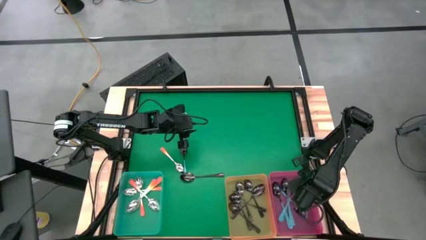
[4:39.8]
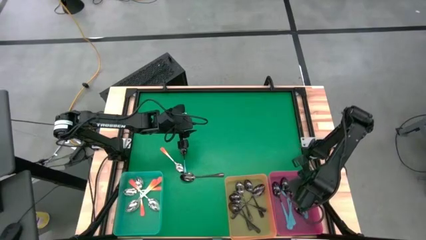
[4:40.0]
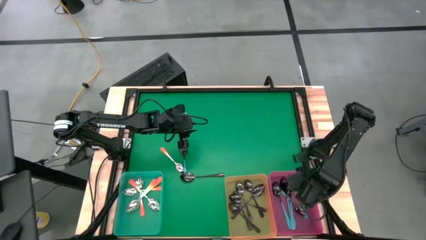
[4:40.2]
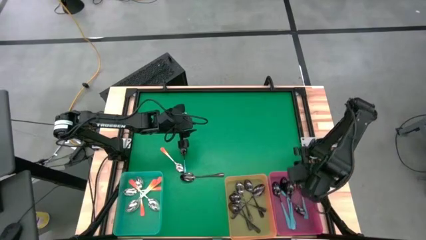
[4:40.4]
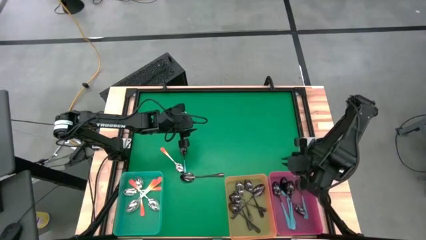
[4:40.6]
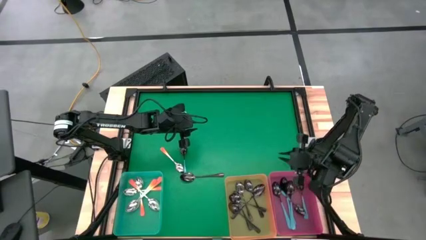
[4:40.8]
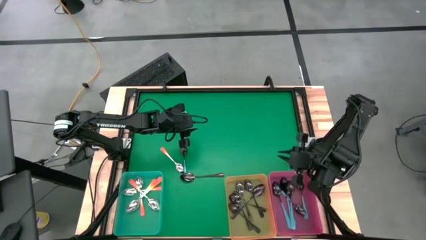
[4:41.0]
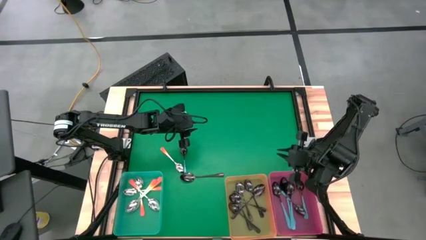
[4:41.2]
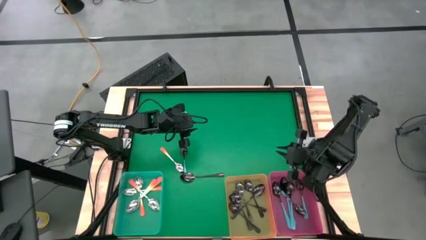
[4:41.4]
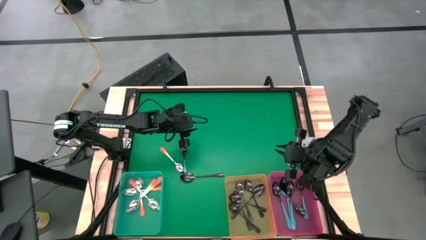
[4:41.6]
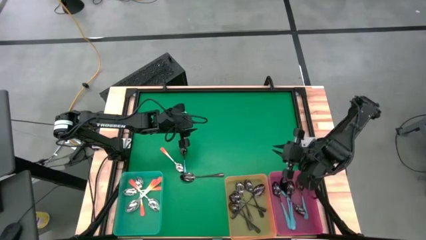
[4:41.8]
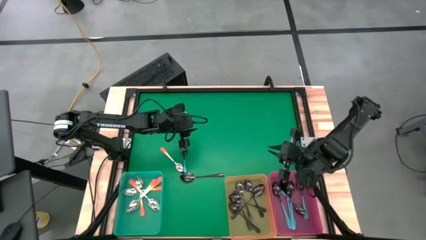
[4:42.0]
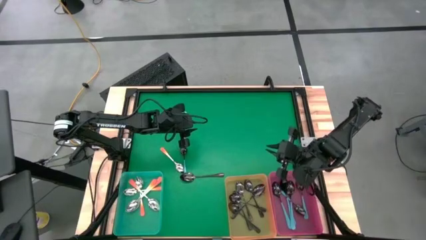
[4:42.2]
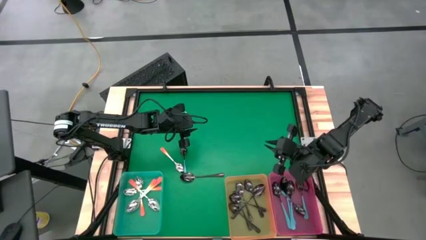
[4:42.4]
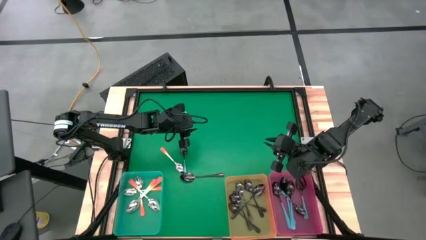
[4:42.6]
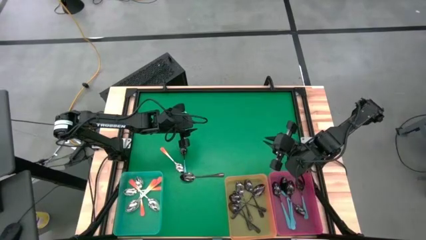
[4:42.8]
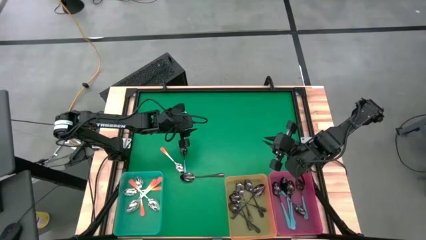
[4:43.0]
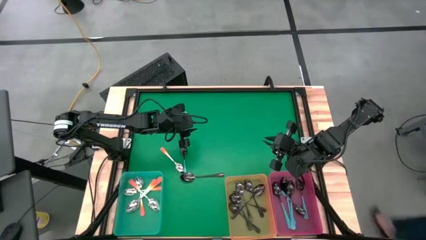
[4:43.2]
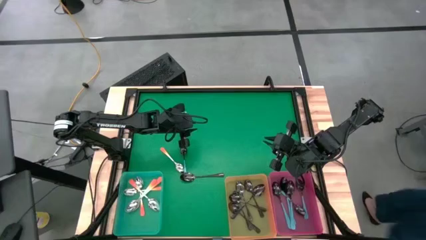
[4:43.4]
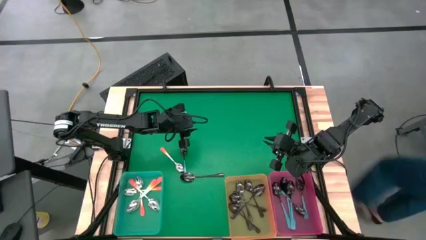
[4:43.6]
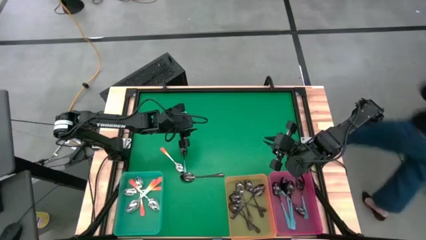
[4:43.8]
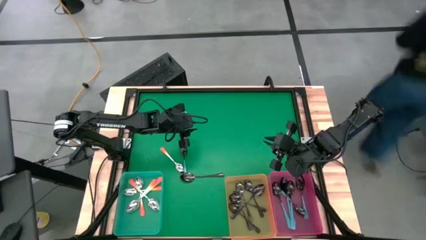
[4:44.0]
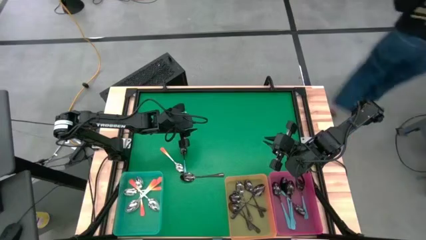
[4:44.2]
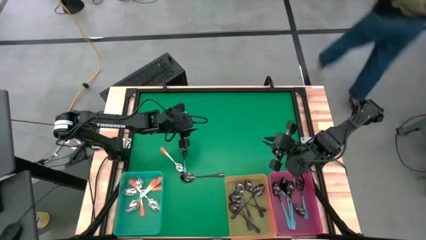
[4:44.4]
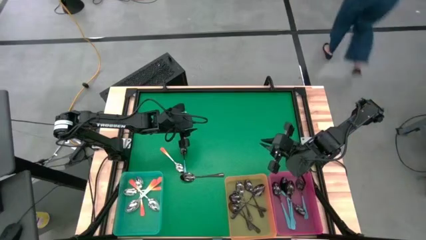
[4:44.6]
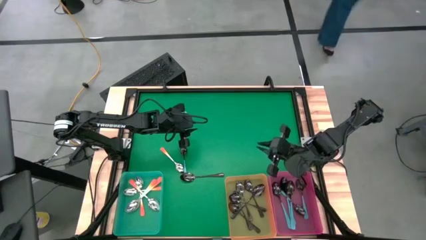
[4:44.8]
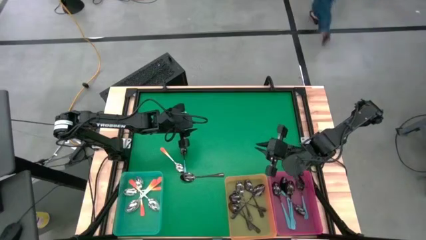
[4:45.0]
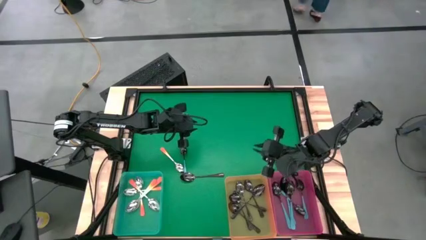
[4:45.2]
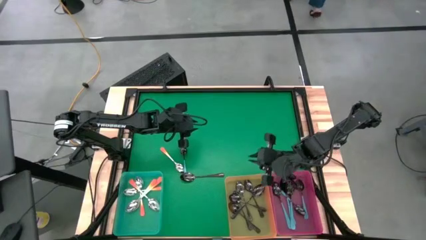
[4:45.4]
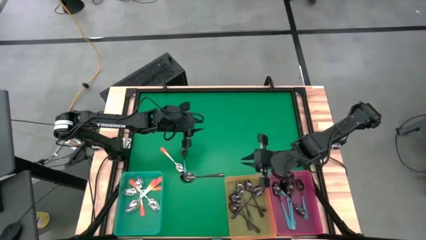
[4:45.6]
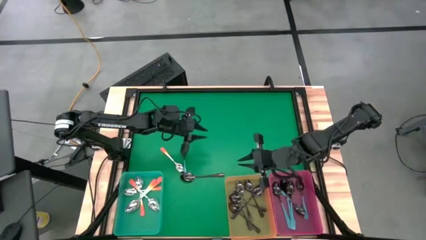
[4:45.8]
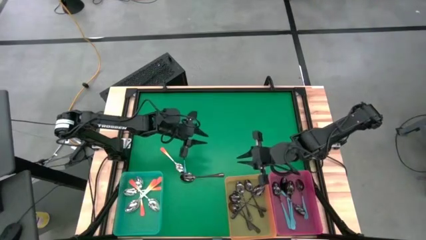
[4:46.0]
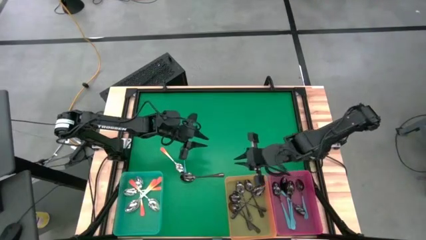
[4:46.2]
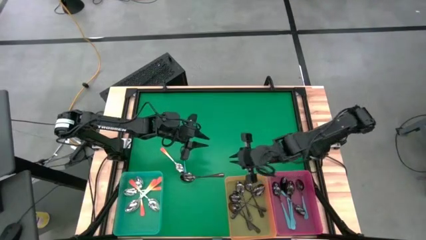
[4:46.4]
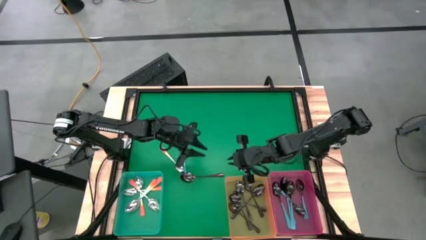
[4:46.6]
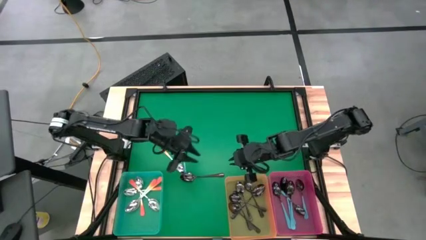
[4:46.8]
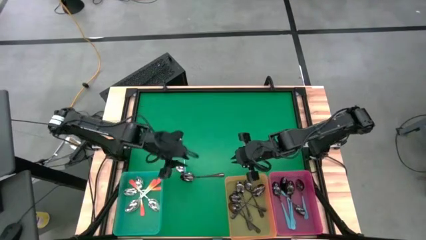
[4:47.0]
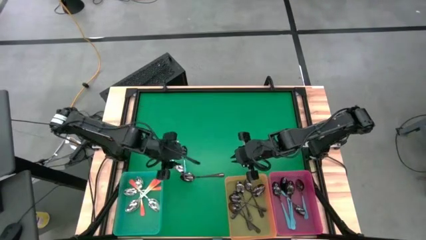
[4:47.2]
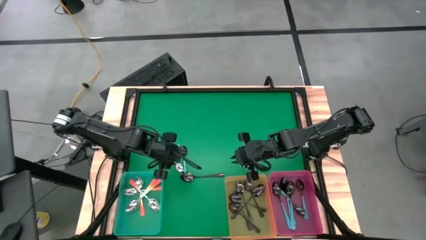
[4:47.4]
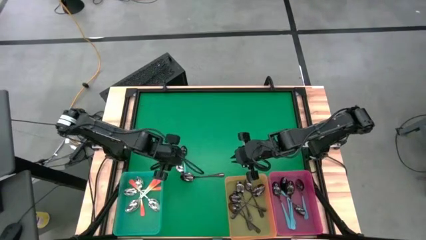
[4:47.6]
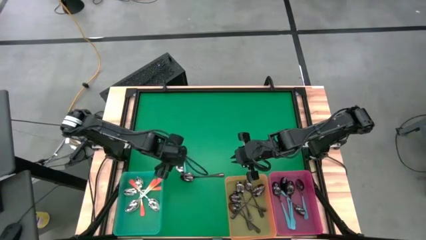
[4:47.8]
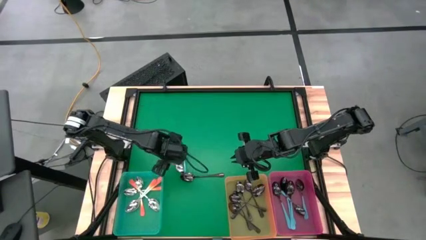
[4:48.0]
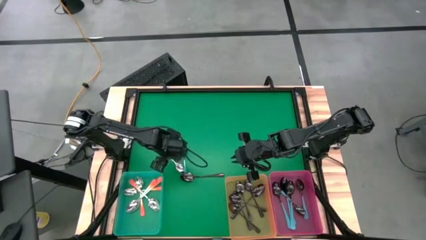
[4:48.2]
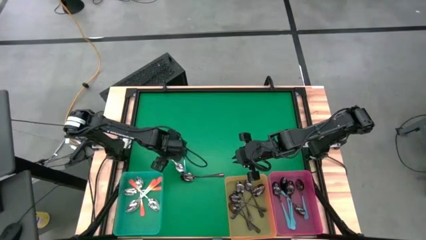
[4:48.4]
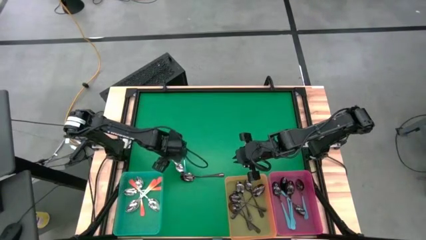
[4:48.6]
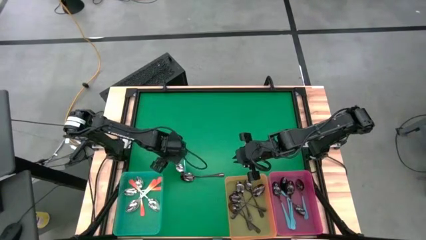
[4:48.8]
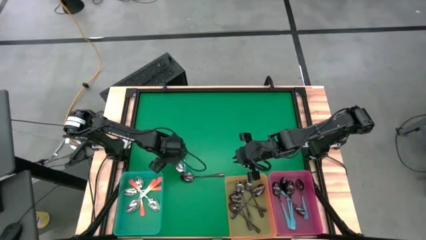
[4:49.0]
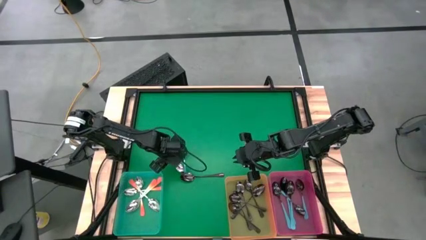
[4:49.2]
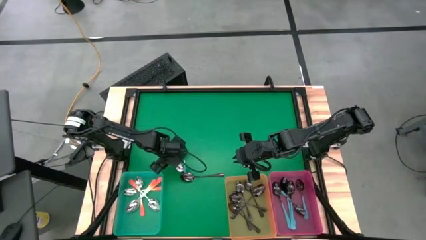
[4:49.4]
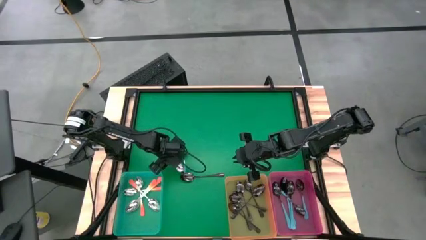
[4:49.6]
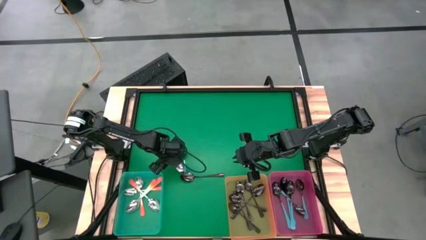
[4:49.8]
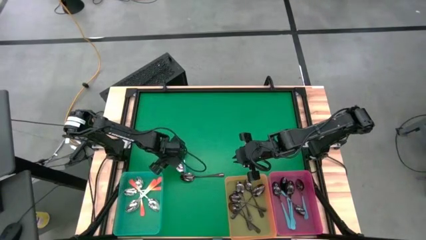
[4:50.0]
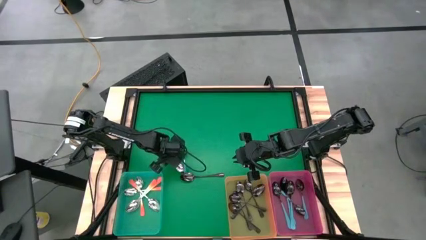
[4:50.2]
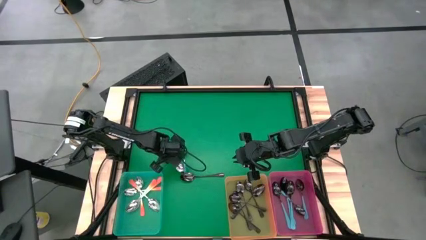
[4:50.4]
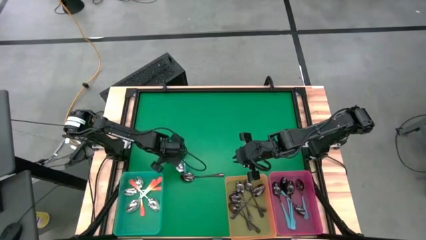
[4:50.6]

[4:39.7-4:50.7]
Task: Sort silverware by color (type)
Put the orange spoon into the green bin

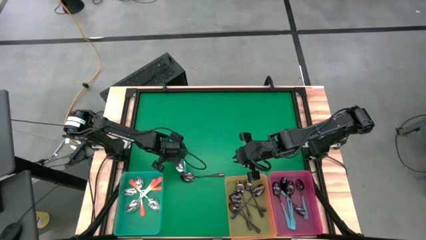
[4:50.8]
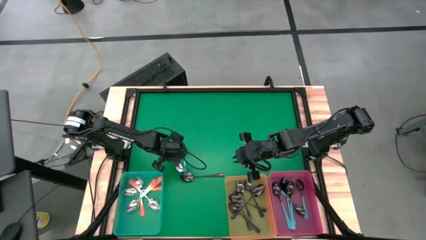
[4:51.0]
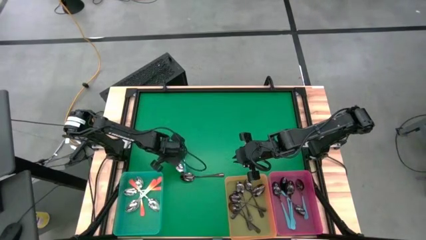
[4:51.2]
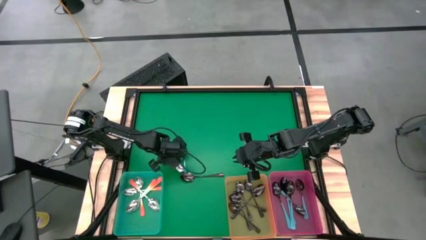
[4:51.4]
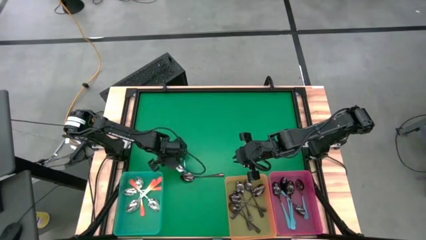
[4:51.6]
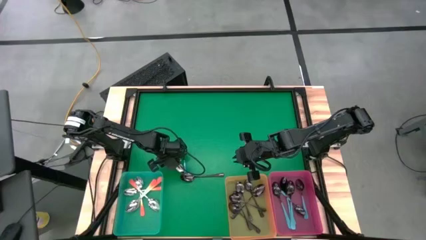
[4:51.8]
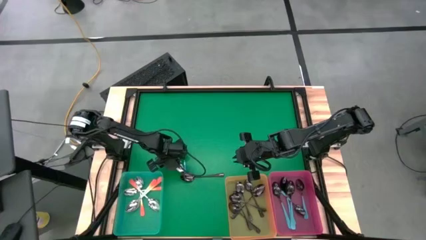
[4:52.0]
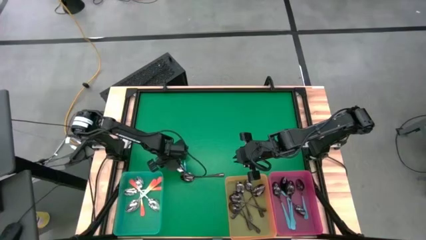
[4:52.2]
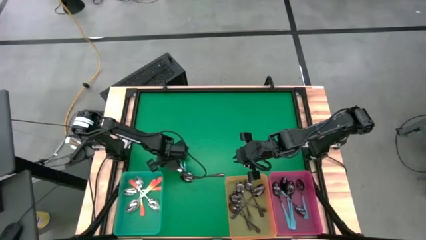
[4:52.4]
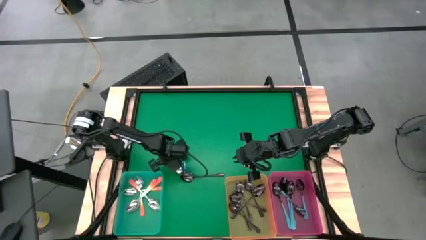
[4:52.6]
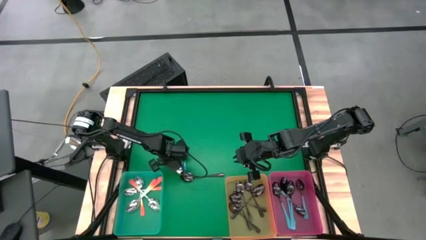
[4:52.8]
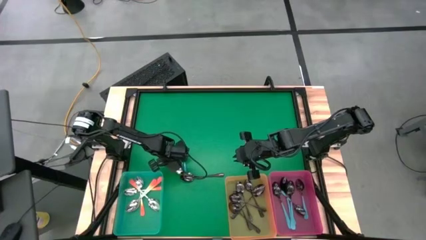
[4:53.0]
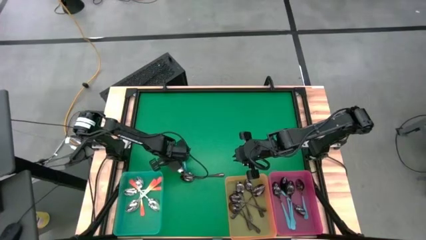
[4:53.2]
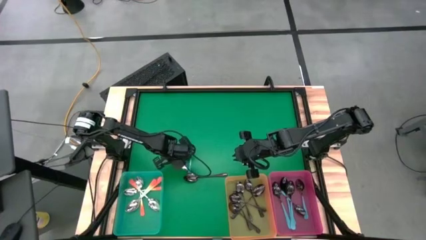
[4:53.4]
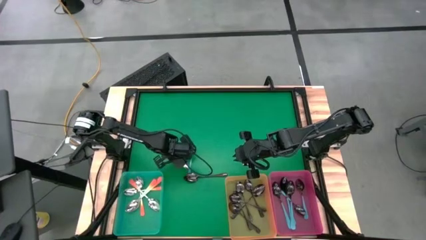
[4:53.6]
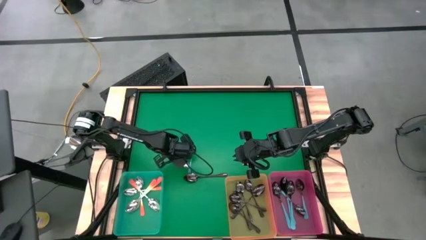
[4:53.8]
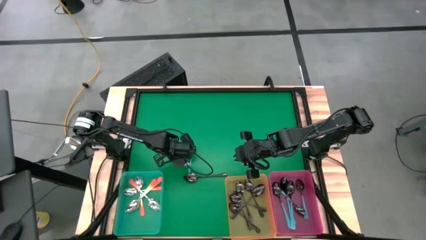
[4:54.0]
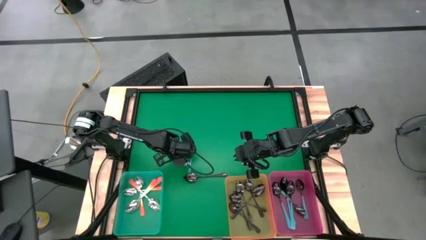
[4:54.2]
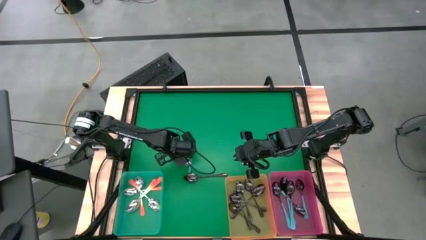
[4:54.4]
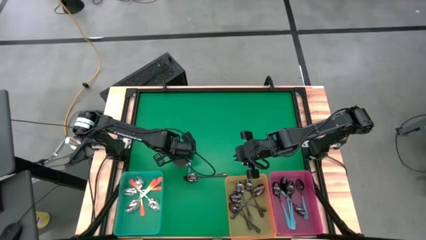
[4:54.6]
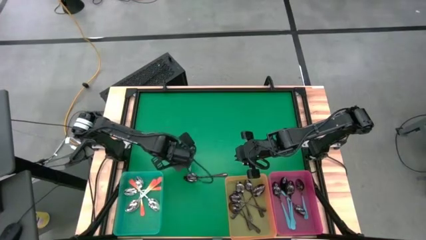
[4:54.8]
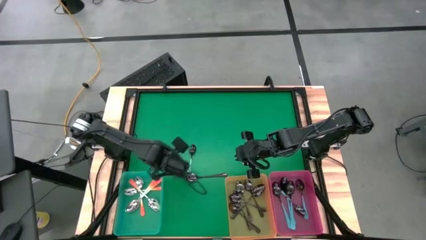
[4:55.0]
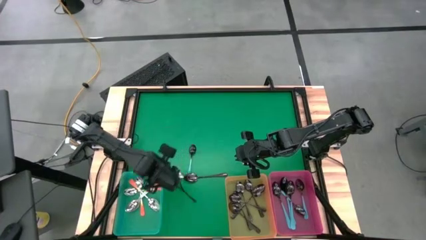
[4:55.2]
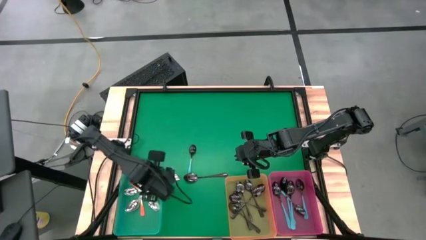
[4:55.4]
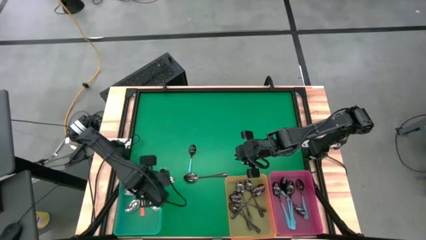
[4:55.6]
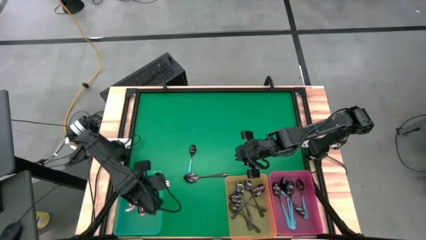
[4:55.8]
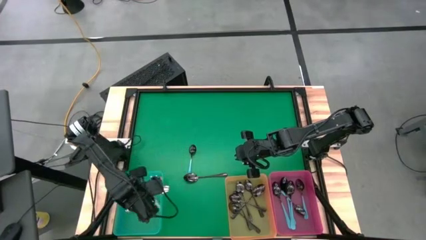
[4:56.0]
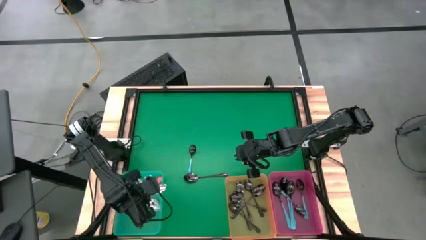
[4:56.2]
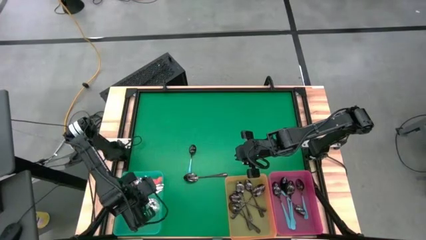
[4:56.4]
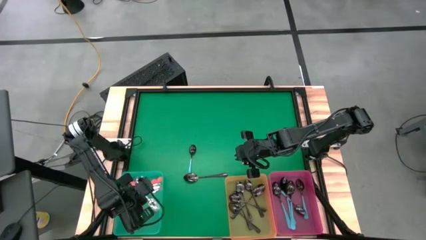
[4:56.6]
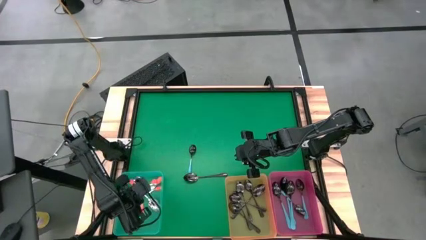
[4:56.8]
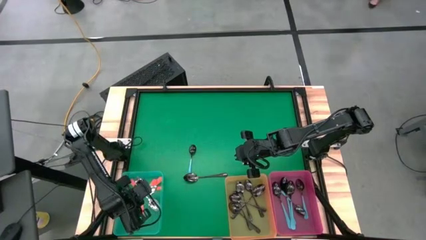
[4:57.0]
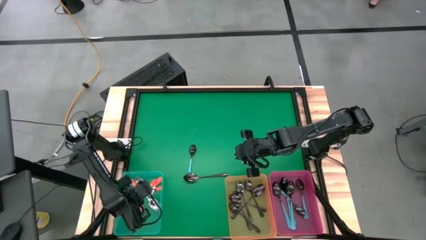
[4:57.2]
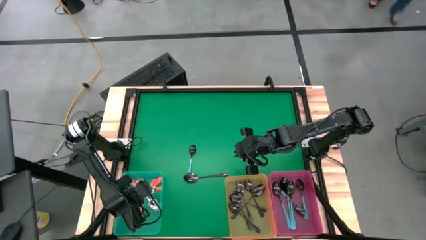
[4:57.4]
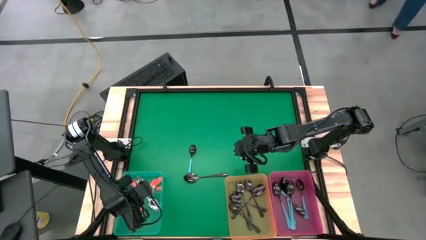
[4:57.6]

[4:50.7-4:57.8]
Put the orange spoon into the green bin
